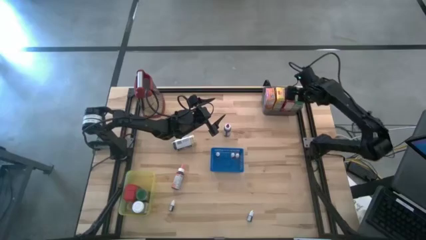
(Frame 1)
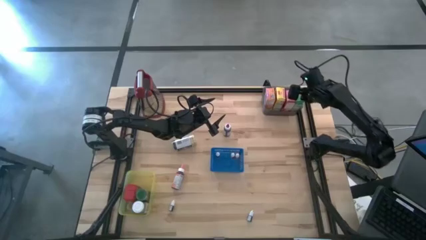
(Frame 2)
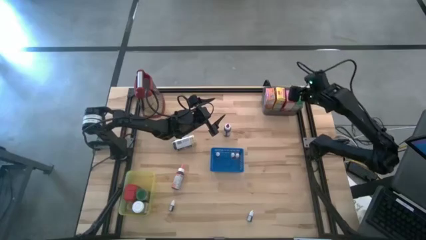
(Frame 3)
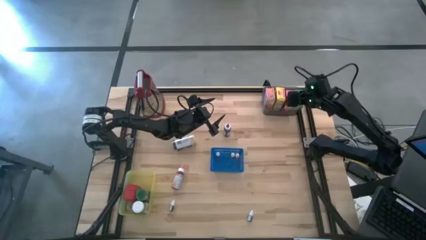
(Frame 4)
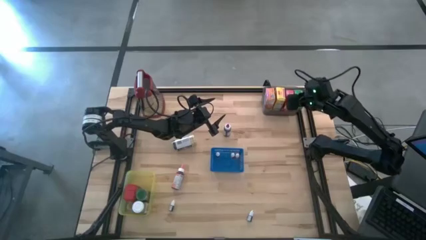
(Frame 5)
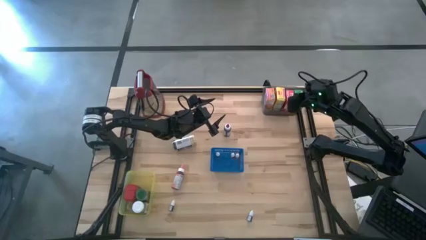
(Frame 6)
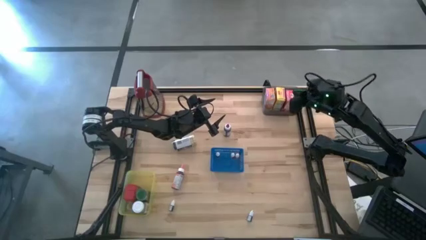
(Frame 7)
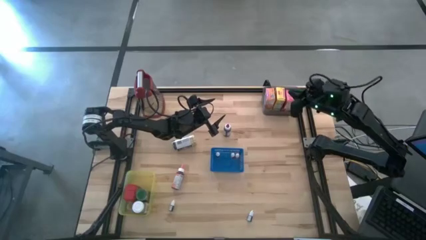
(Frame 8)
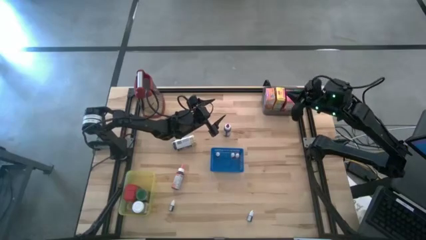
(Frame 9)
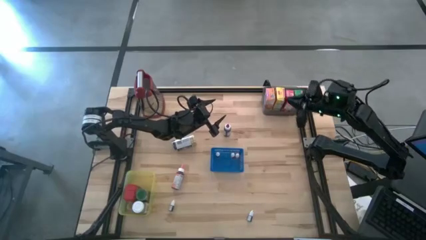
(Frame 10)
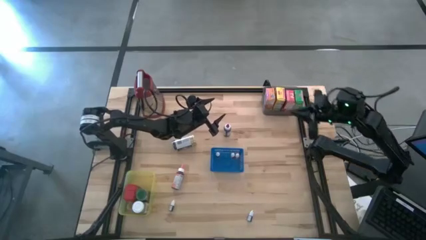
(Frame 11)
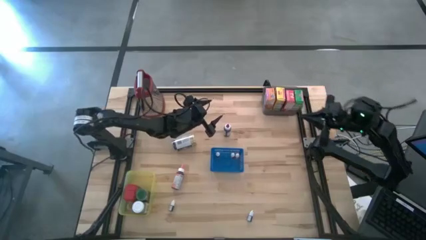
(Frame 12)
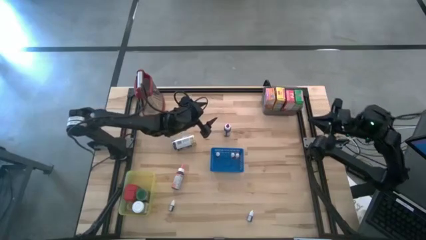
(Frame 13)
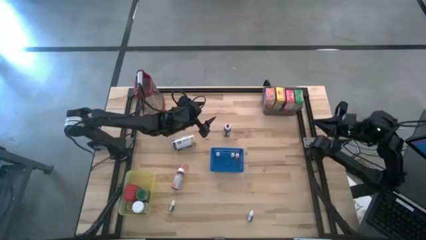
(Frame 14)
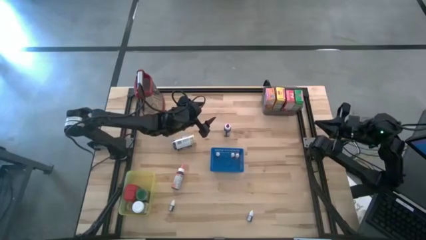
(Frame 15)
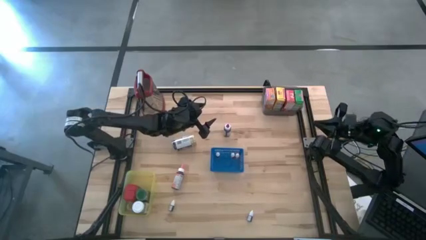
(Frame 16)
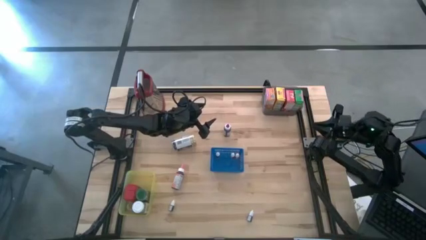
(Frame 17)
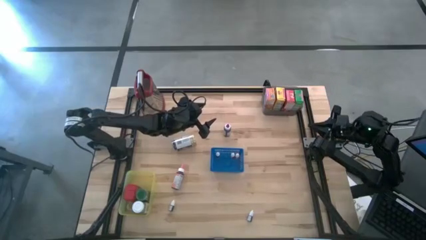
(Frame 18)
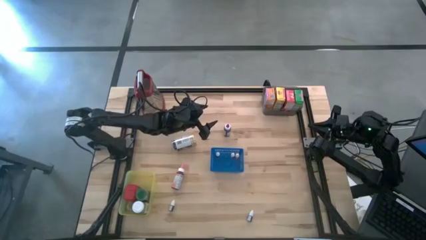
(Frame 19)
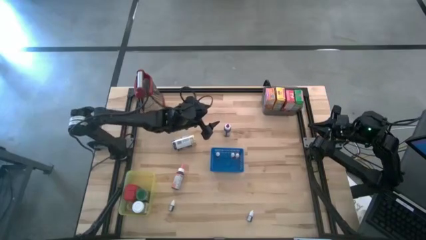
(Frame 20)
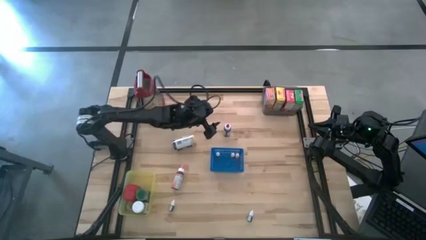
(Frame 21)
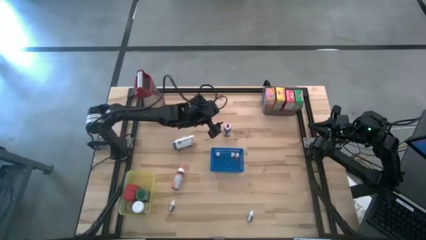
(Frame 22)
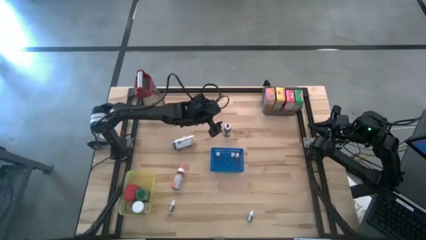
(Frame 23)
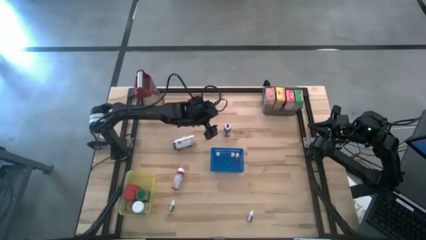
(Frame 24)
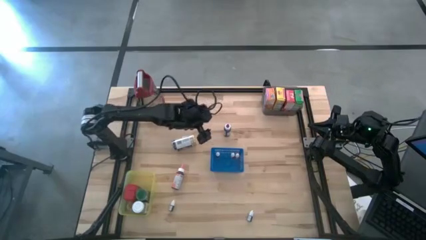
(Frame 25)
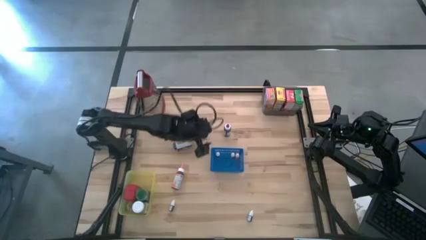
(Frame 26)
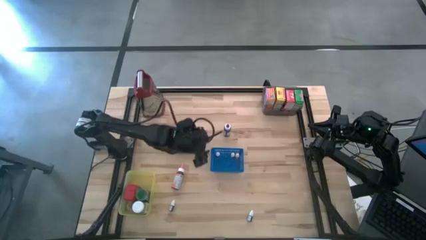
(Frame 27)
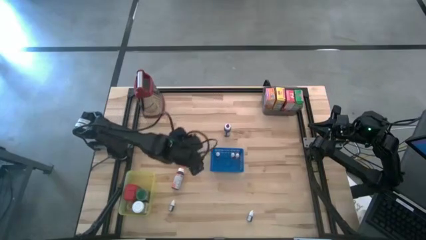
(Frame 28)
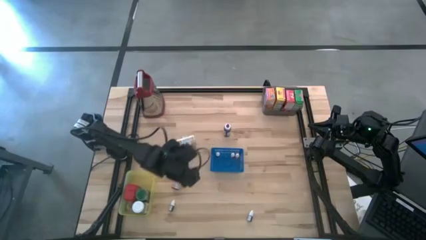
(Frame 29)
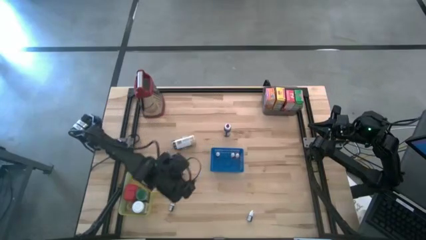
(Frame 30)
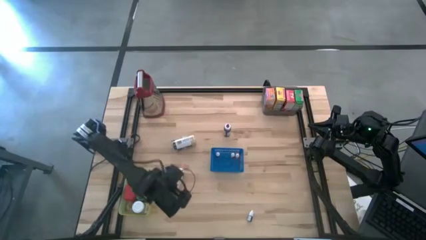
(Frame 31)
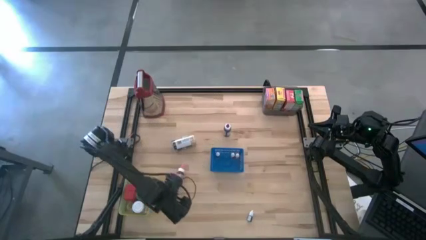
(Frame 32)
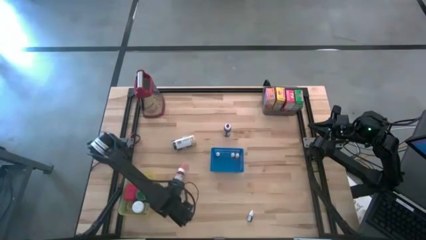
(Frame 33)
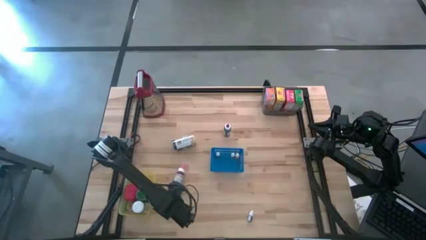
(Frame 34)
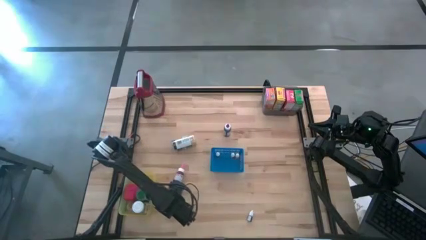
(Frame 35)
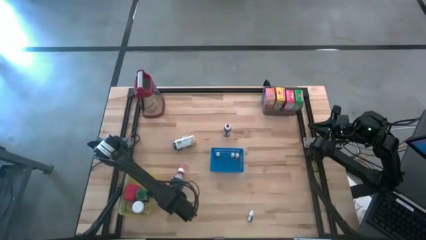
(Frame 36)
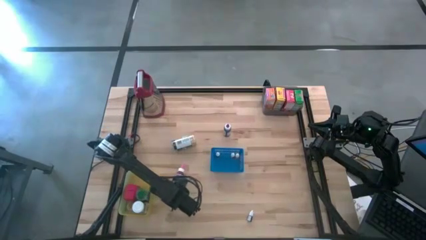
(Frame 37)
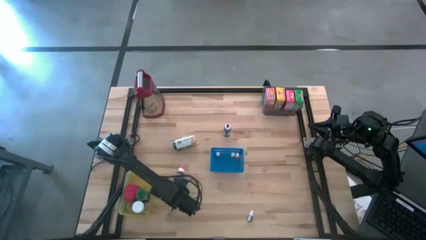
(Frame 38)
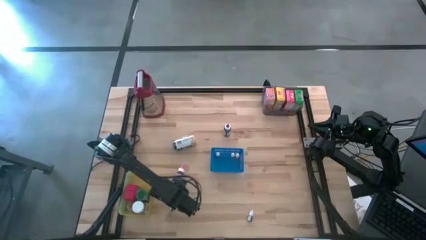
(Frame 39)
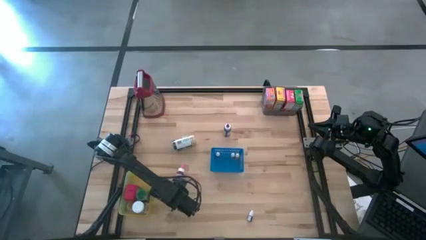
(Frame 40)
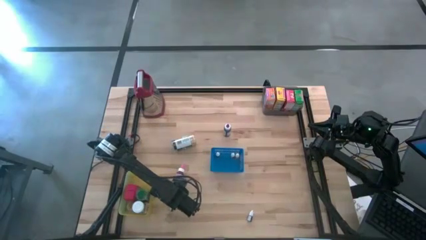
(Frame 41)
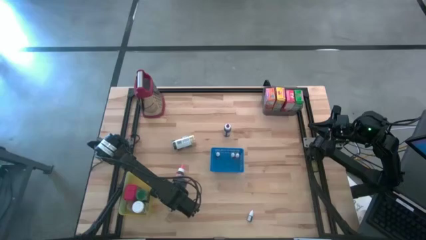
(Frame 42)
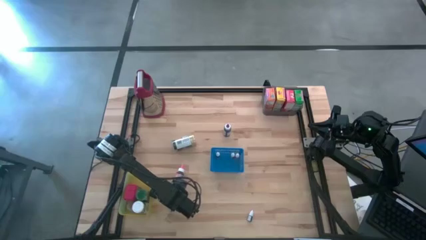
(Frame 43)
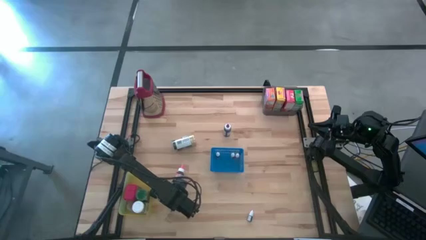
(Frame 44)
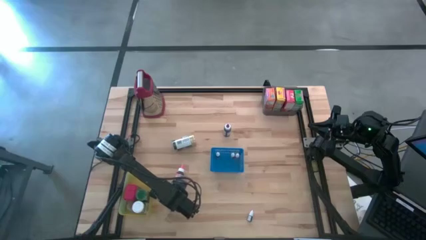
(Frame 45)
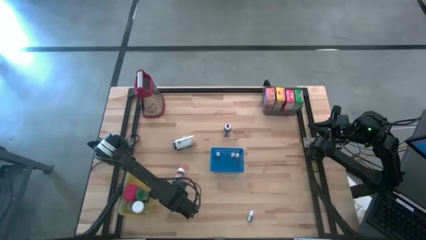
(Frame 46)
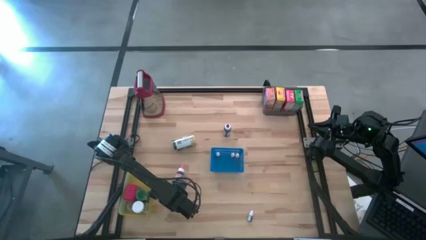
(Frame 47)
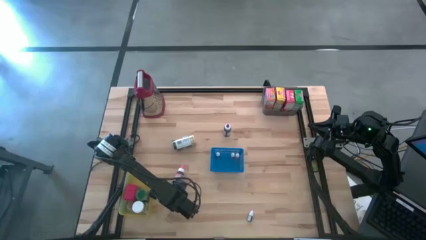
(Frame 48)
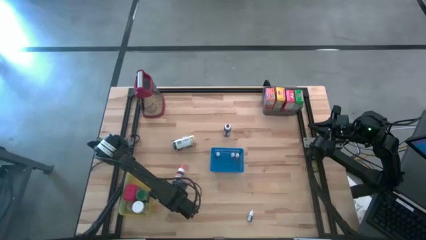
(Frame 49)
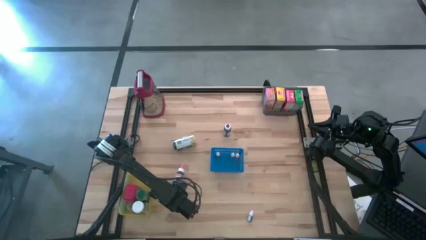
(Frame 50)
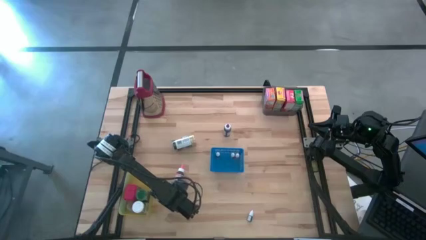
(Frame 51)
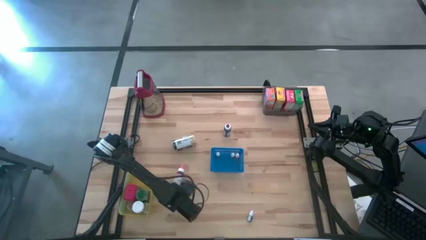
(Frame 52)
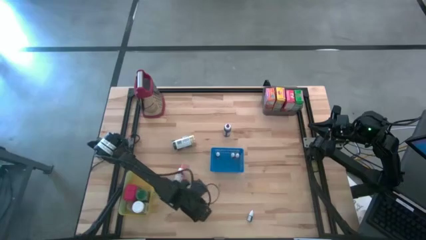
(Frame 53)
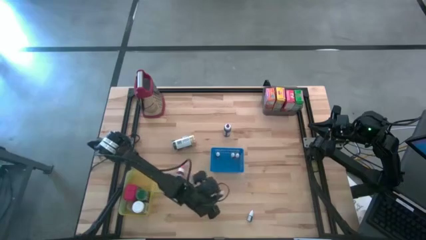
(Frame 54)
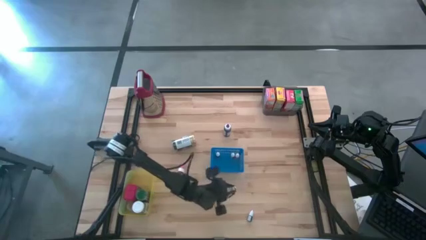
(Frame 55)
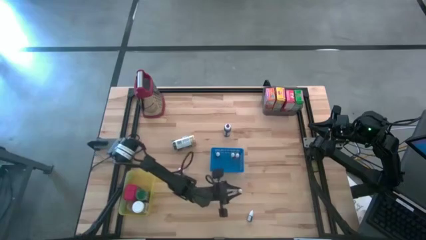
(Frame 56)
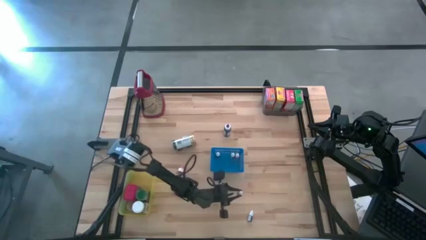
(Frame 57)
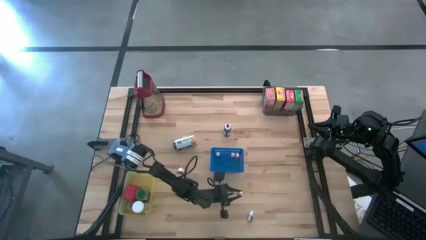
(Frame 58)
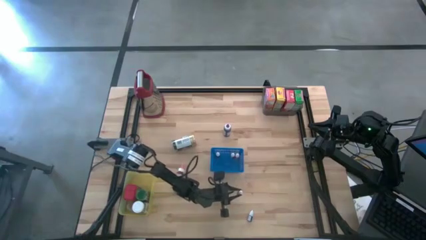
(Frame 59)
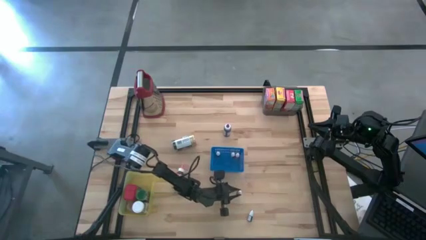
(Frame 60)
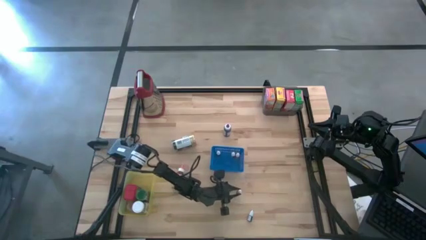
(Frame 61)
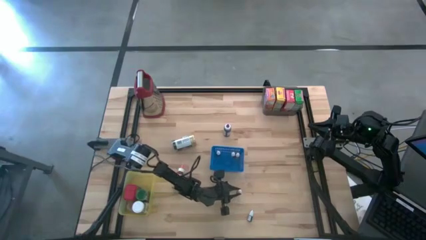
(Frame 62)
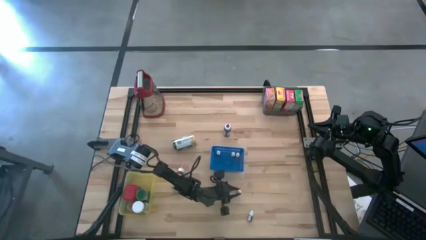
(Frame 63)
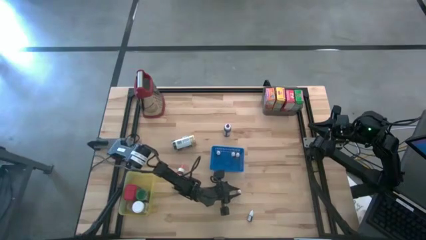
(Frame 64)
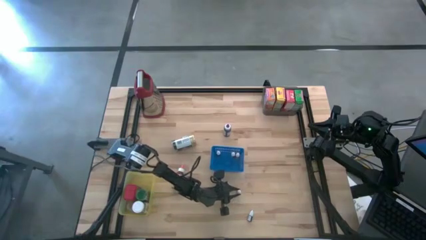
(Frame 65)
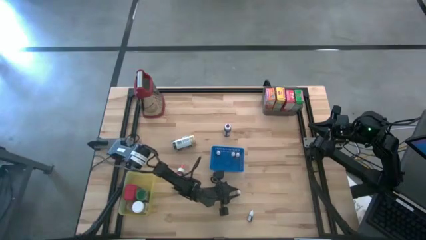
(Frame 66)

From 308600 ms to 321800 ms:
Task: Pick & Place Kitchen Items
Move the small pink food coloring bottle to the bottom middle of the table
